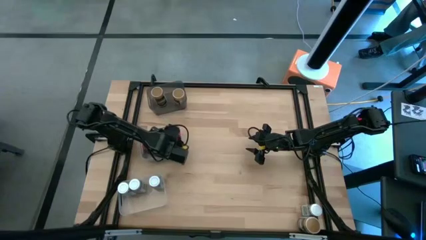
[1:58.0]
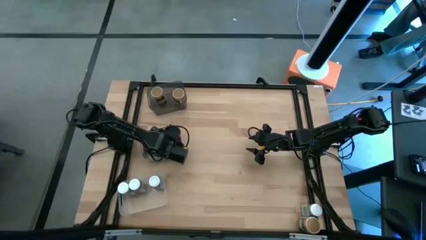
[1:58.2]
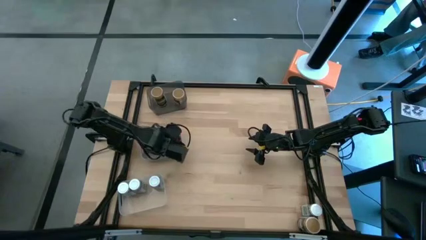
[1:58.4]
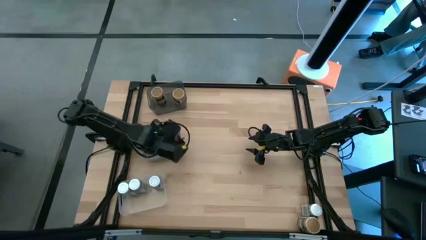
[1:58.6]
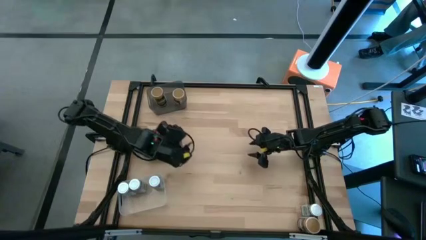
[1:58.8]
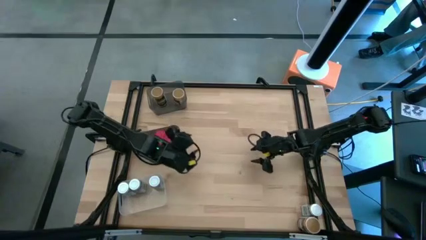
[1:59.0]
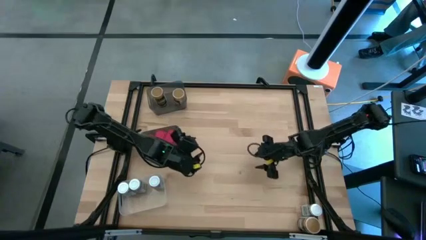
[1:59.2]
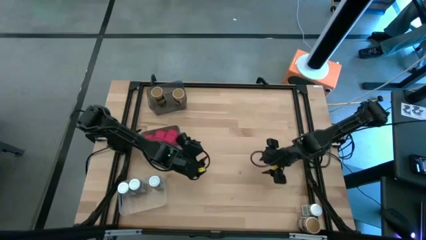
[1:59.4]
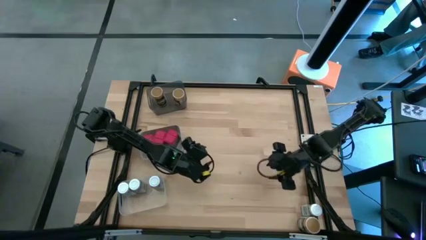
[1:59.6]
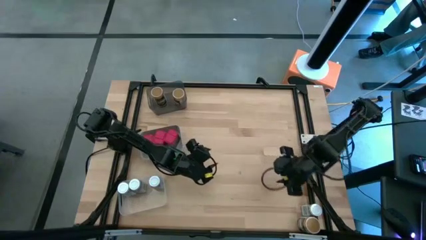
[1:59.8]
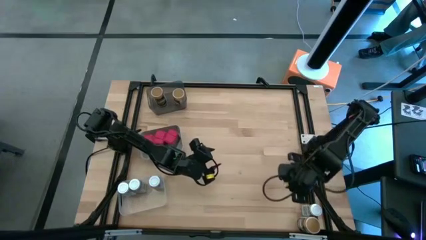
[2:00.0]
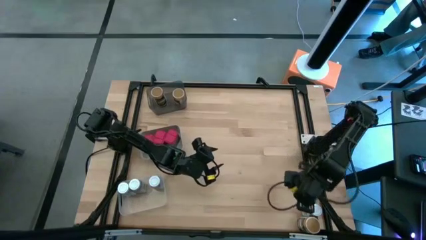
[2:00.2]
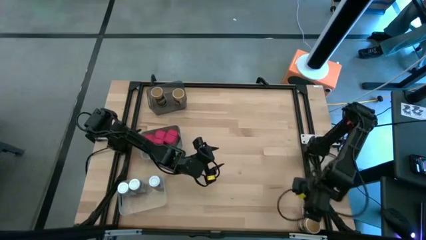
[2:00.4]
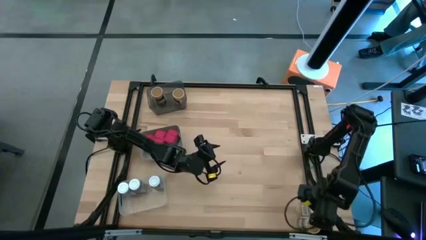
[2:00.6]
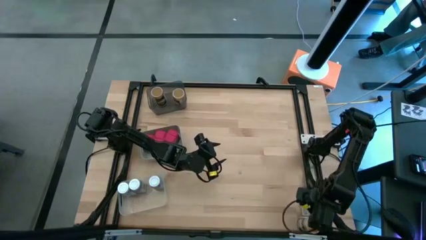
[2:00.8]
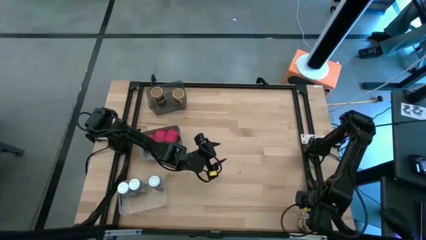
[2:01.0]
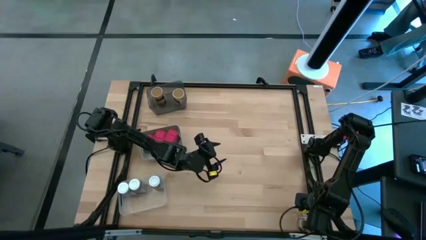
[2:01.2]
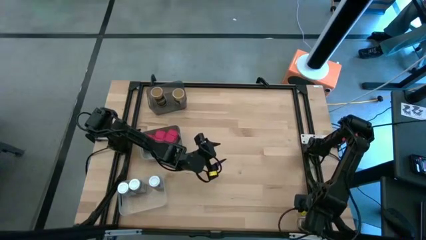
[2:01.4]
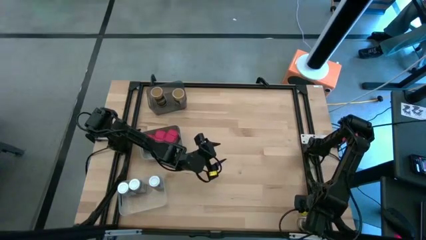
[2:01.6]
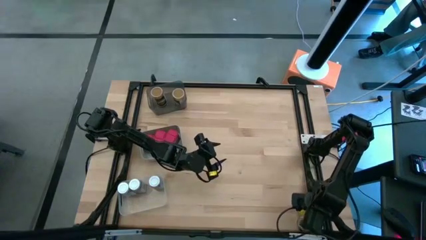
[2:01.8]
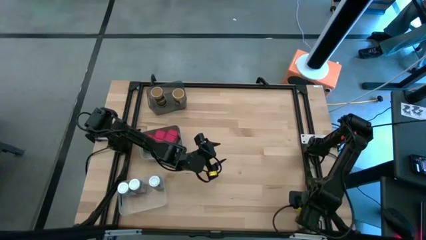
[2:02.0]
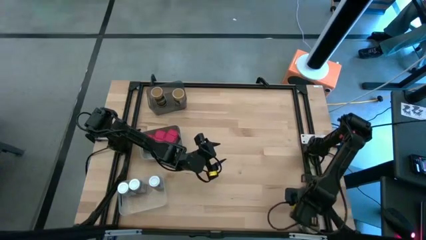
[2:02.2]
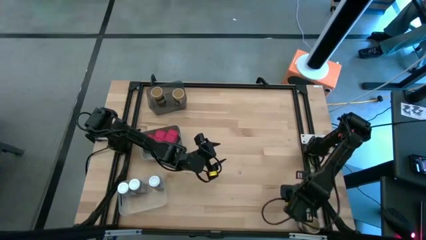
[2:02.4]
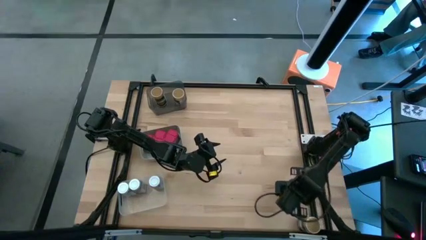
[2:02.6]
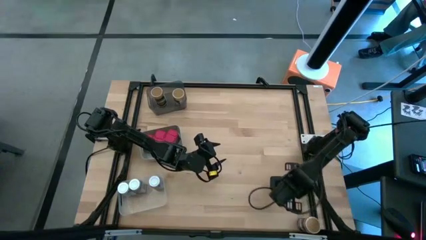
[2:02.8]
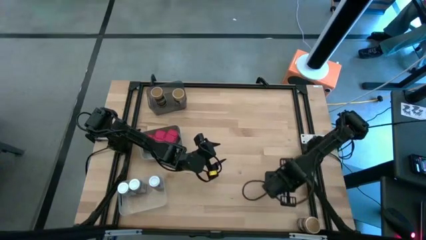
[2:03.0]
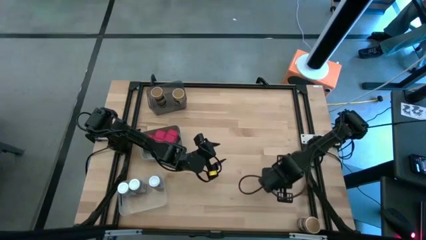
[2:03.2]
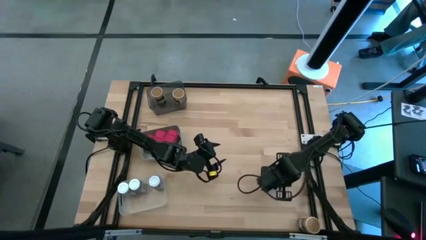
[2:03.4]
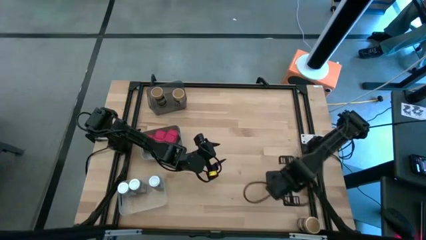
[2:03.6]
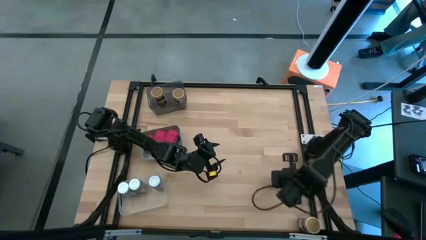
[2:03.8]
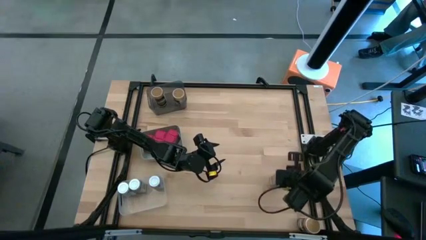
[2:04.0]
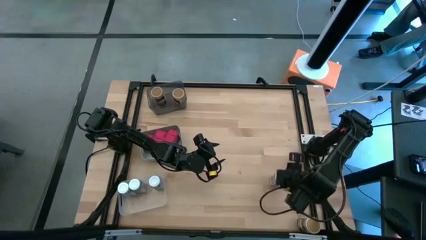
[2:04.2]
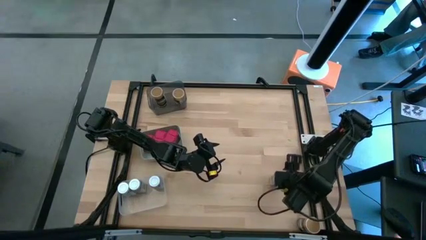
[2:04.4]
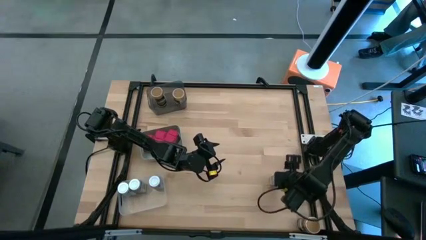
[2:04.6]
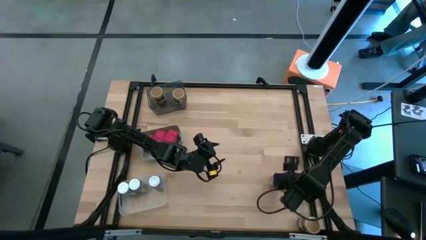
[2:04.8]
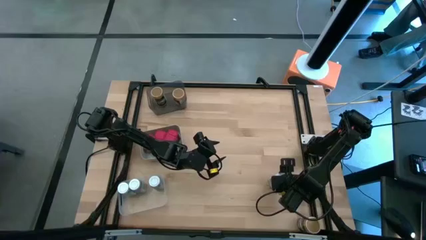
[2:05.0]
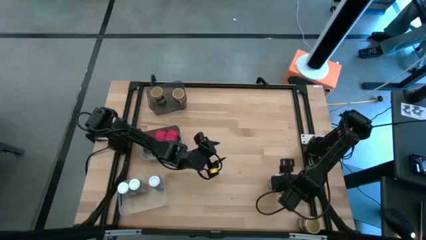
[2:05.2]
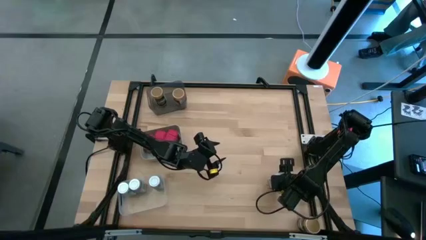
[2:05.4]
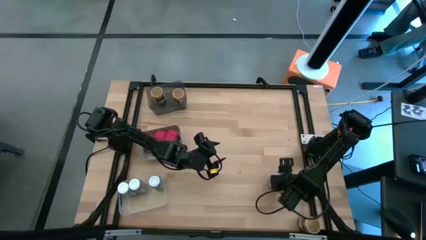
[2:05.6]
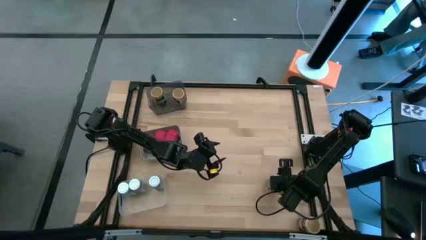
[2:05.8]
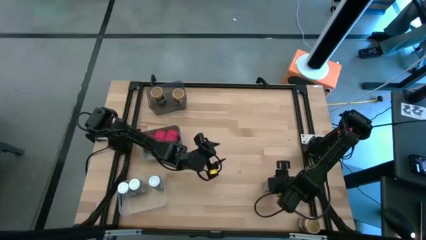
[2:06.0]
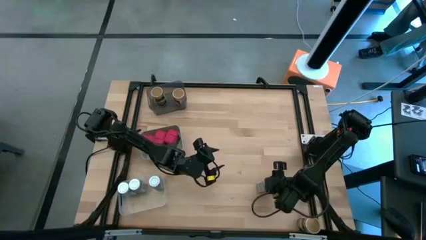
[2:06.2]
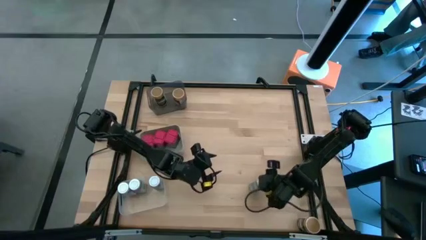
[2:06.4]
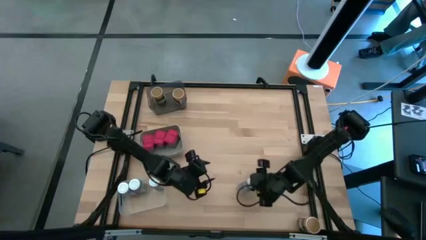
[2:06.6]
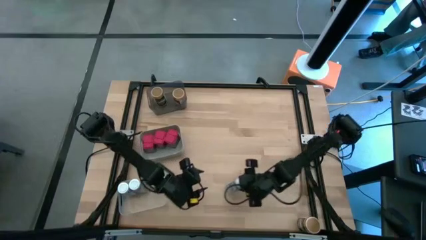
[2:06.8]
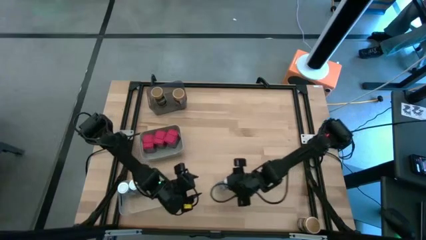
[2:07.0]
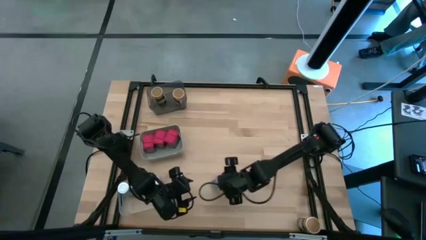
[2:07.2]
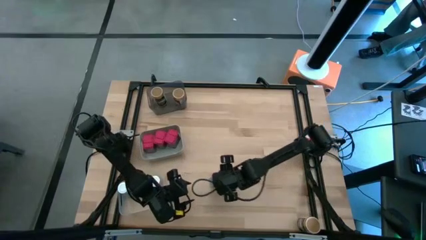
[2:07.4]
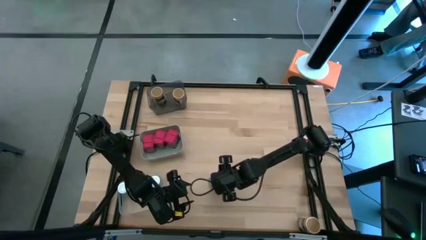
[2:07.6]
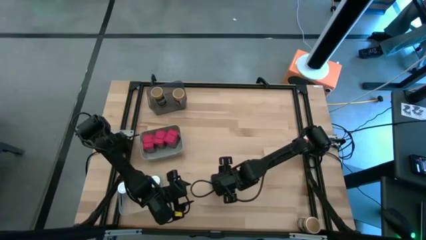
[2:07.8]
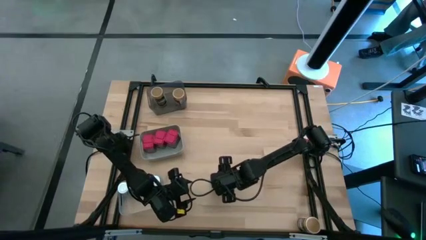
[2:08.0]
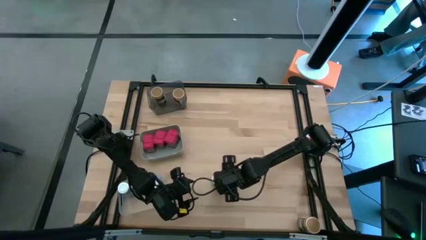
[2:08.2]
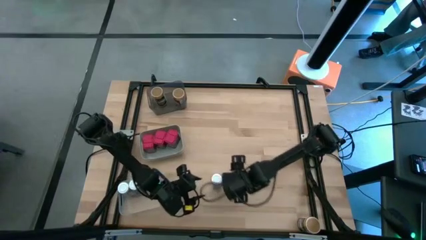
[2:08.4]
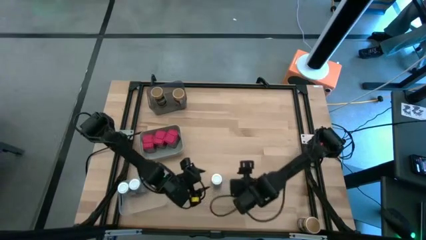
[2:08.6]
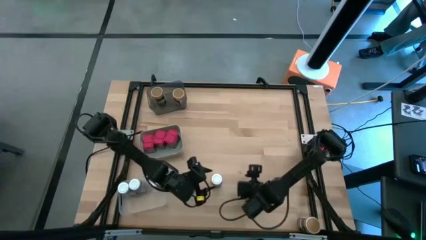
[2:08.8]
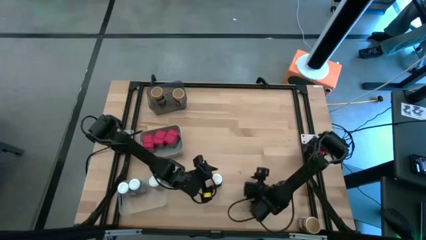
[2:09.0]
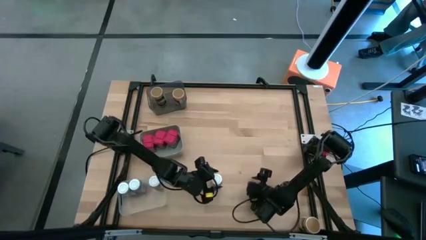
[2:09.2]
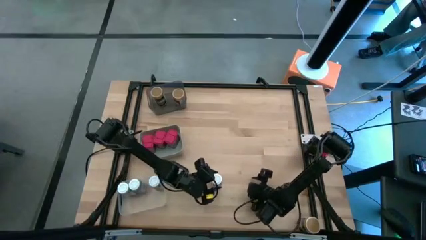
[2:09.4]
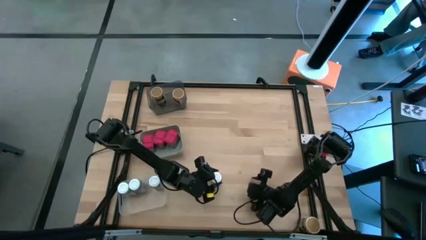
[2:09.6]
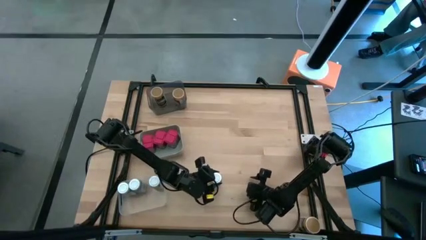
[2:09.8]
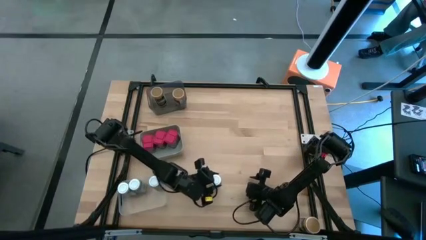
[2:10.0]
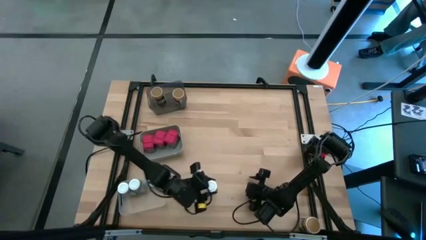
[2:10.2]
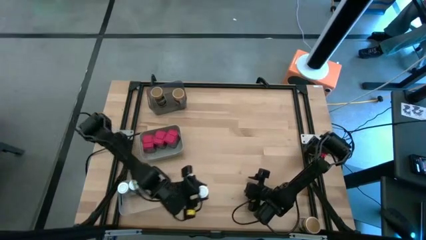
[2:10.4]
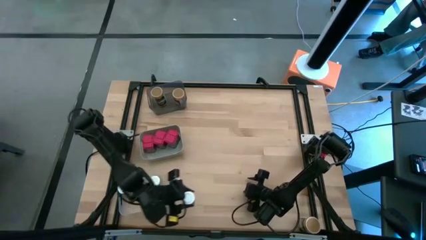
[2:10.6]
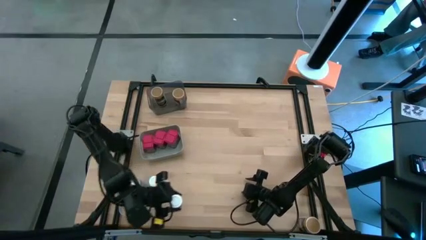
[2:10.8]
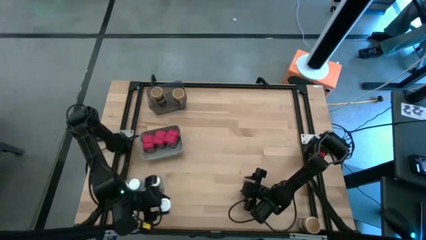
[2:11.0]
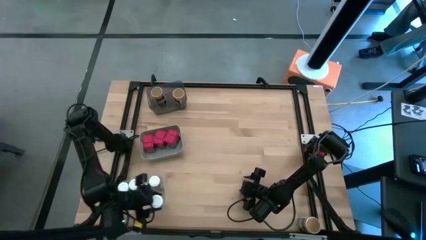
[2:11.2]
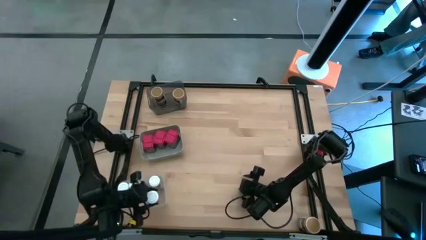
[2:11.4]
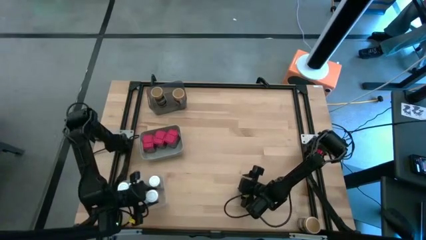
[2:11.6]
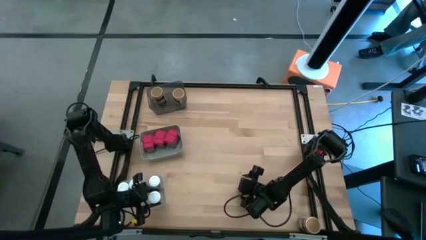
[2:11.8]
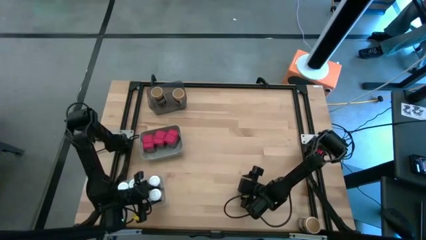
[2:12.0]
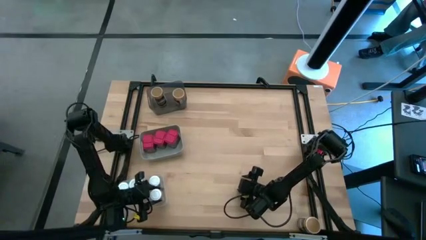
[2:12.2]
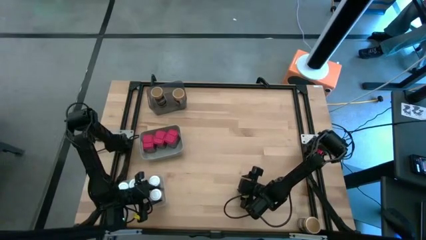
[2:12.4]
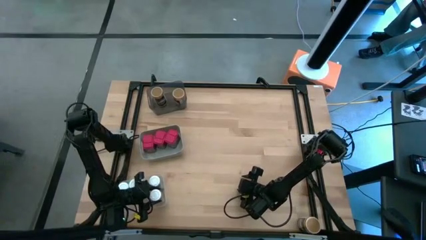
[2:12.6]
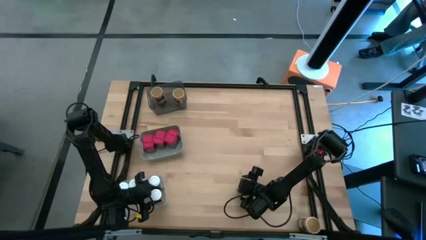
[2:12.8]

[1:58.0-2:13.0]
Task: Sort spices by type
Put the white seasoning can into the transparent bin

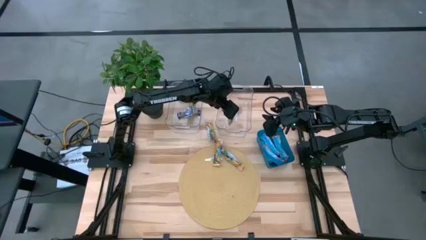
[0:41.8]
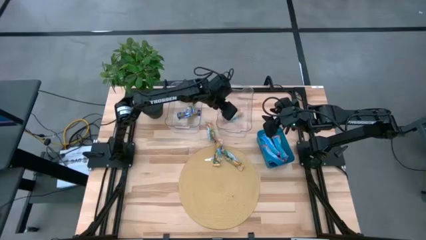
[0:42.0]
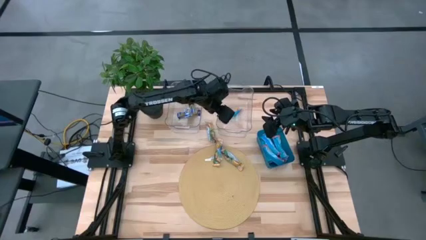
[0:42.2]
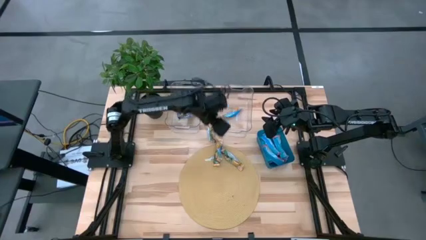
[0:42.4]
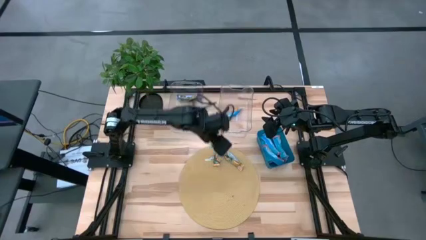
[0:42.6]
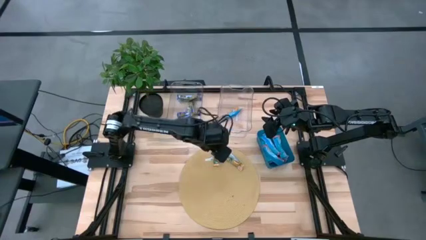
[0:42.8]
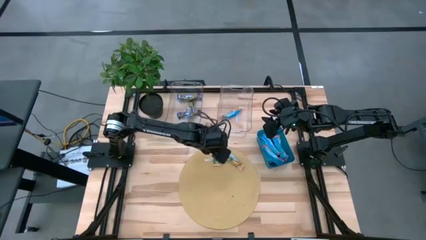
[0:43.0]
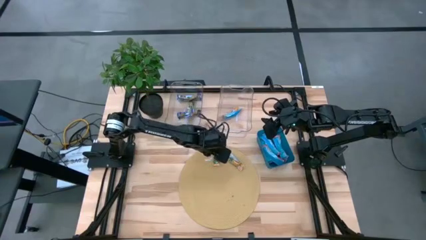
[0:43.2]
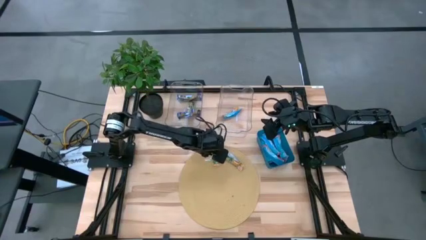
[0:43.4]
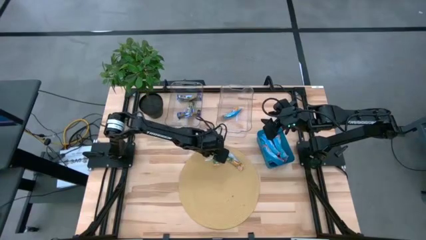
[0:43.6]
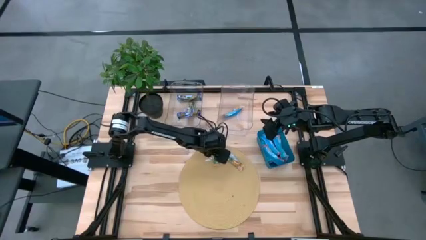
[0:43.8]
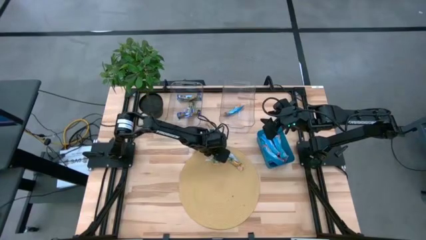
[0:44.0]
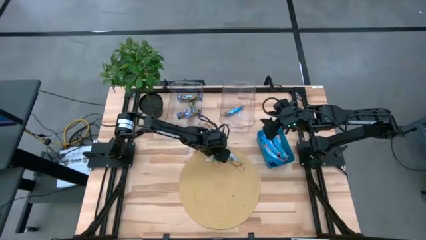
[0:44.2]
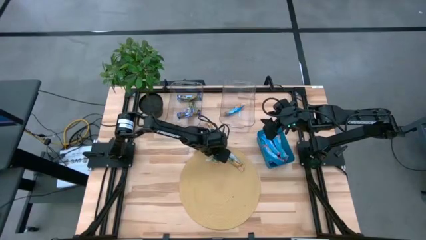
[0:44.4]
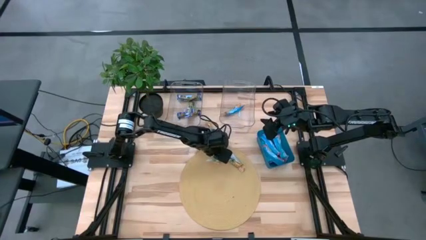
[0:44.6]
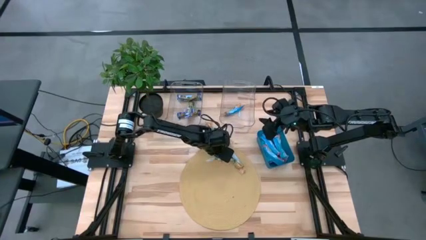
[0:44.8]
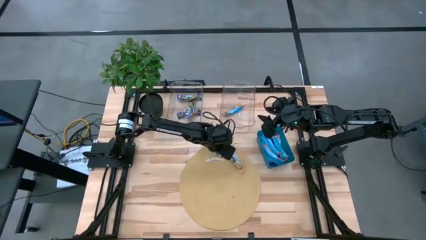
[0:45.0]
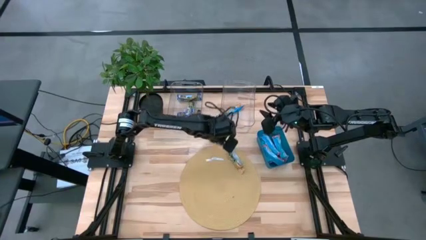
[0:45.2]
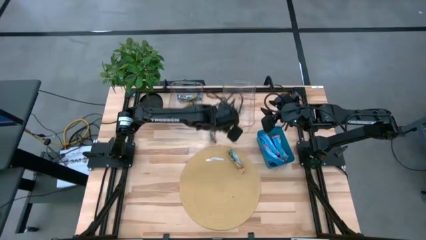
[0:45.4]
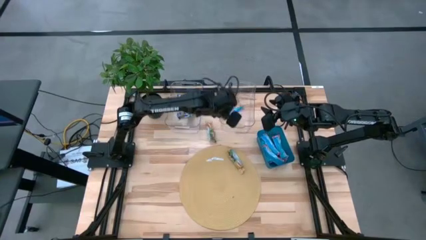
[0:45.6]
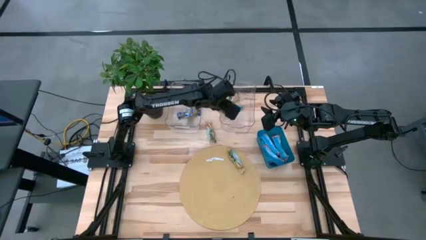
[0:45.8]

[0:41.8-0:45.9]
Task: Pick and place Granola Bars by type
Put the yellow granola bar into the right transparent bin
